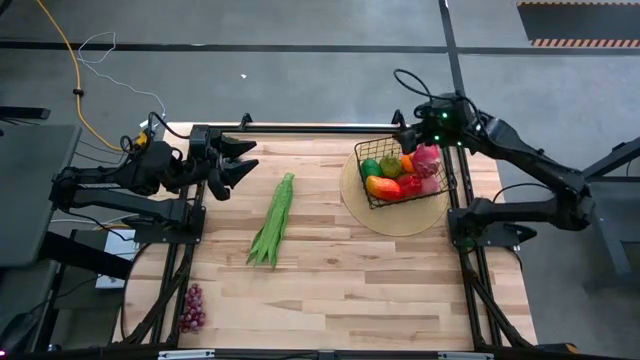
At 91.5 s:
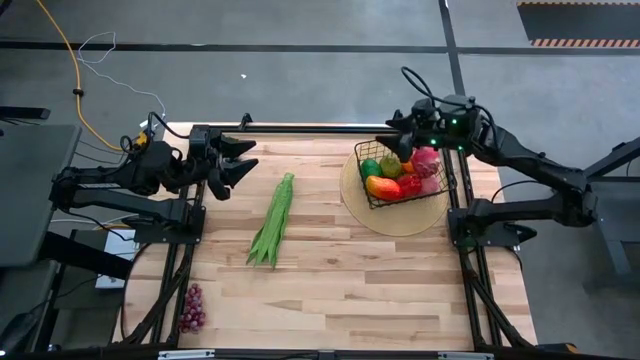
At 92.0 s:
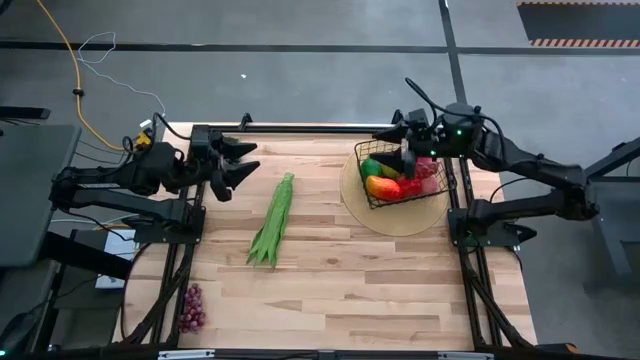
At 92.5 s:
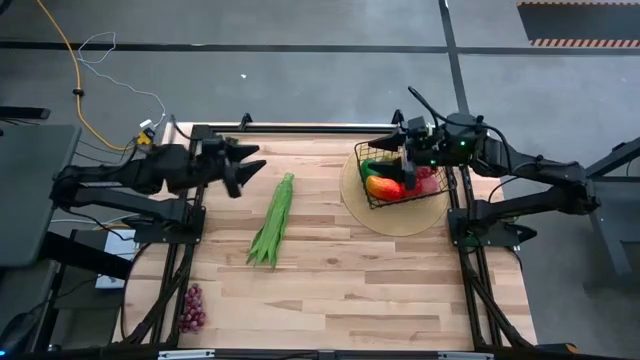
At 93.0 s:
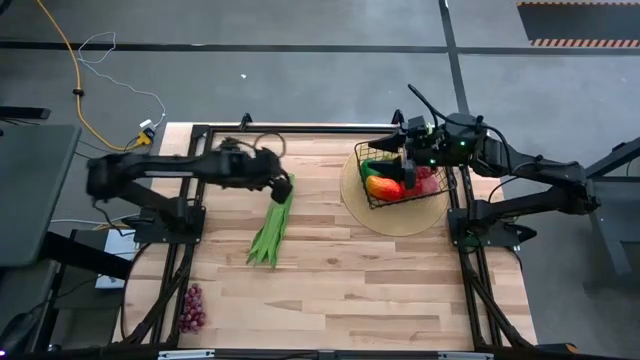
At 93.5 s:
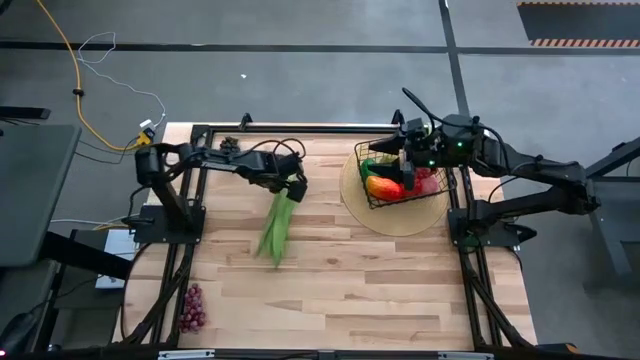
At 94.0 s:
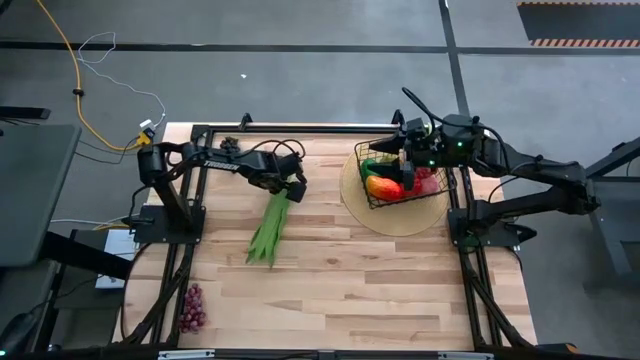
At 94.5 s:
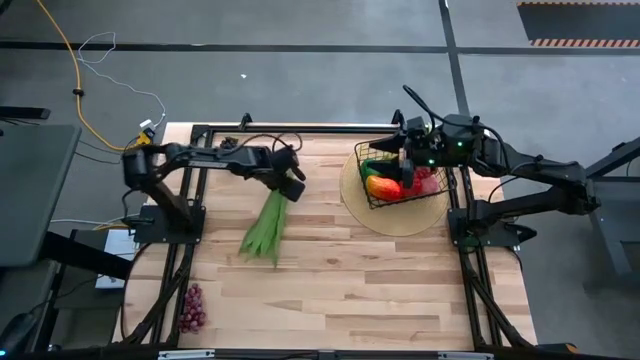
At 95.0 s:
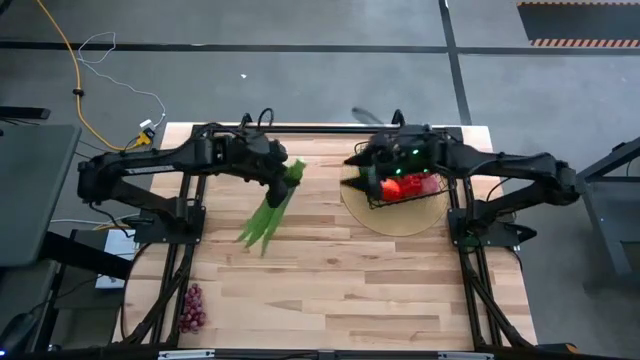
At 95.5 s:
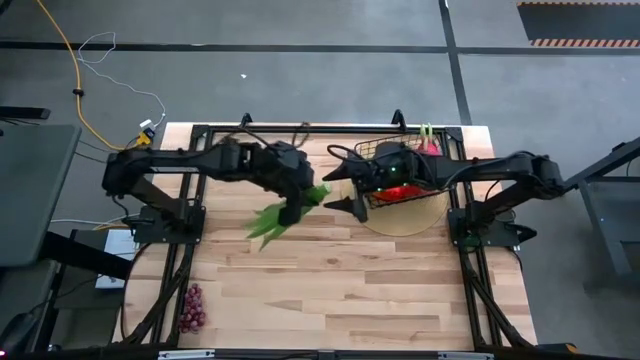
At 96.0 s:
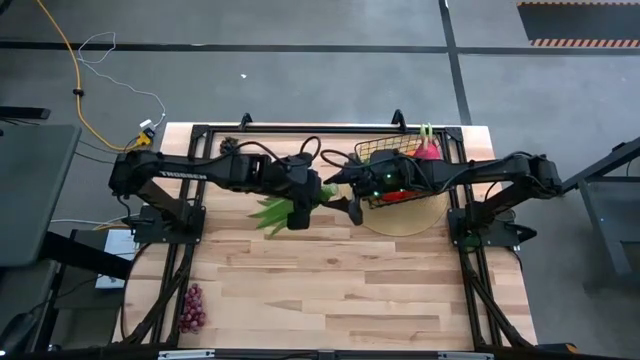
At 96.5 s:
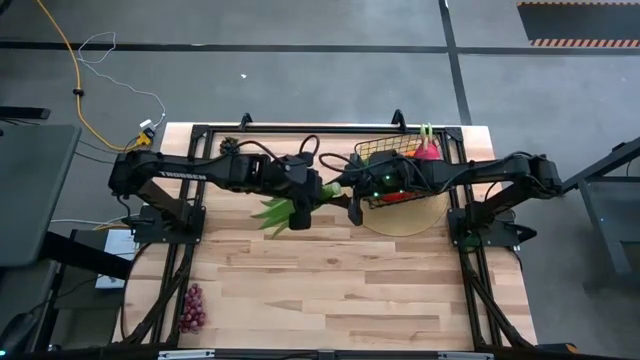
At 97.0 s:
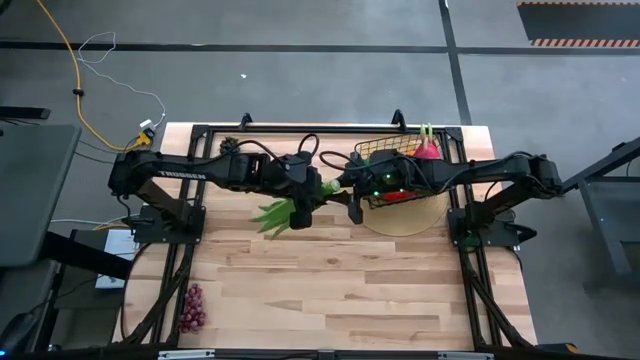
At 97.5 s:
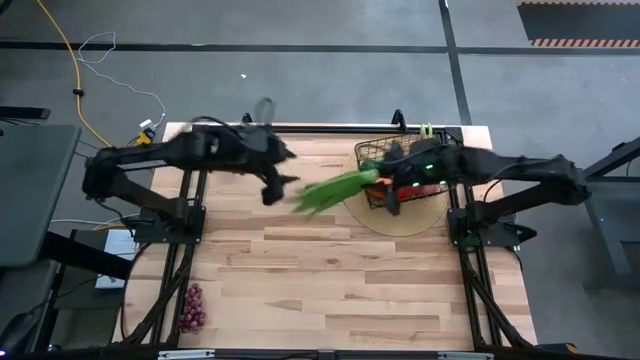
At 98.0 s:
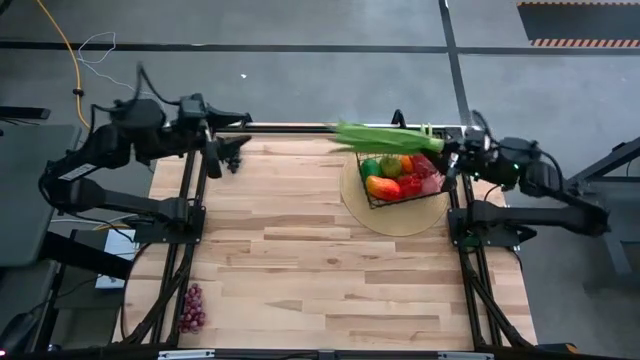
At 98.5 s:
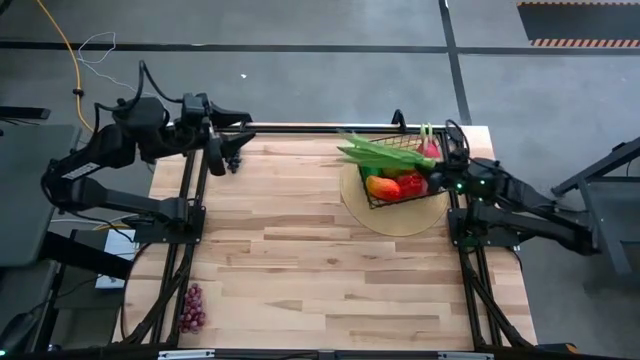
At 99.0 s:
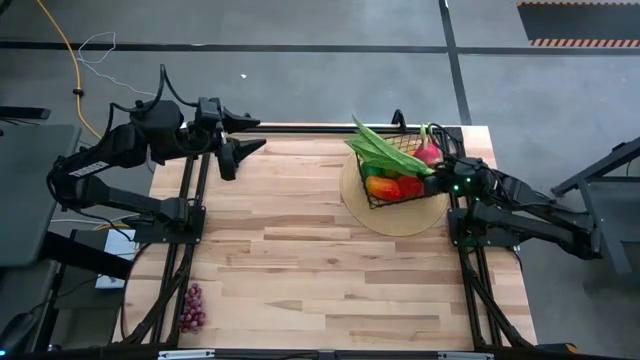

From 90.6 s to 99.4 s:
Task: Build produce basket
Put the green leaf lettuce into the black wire basket

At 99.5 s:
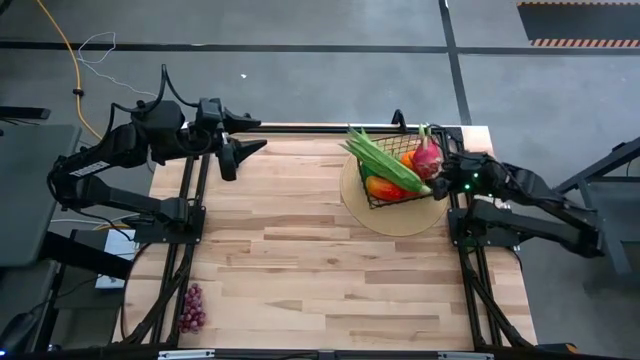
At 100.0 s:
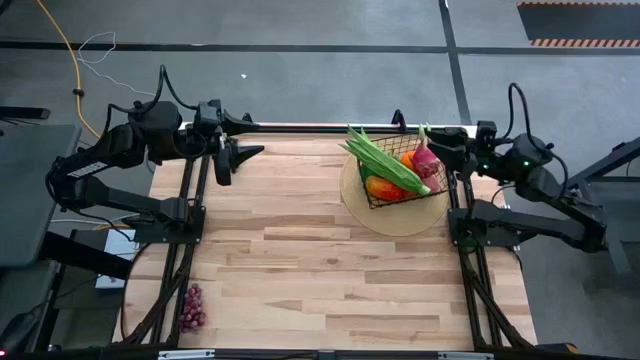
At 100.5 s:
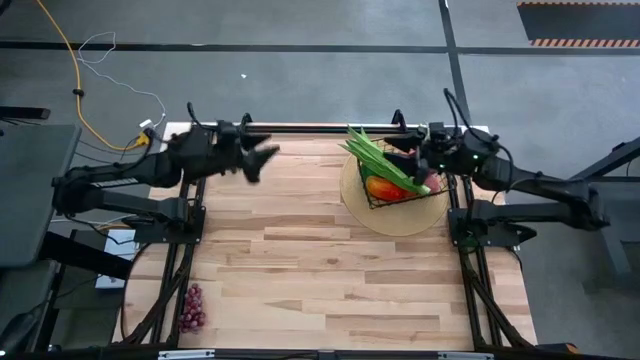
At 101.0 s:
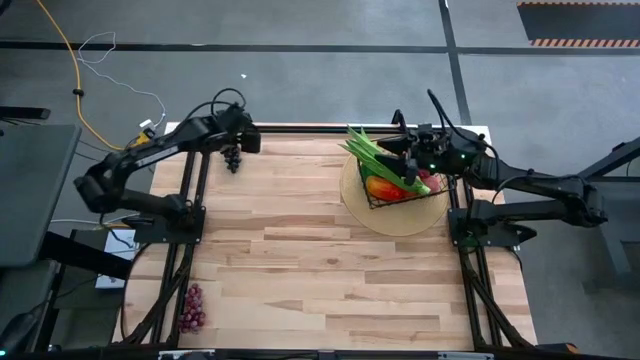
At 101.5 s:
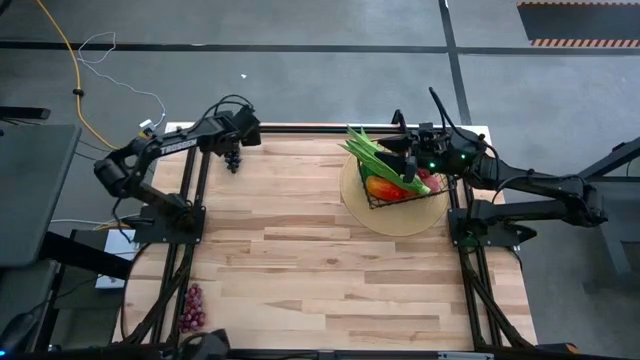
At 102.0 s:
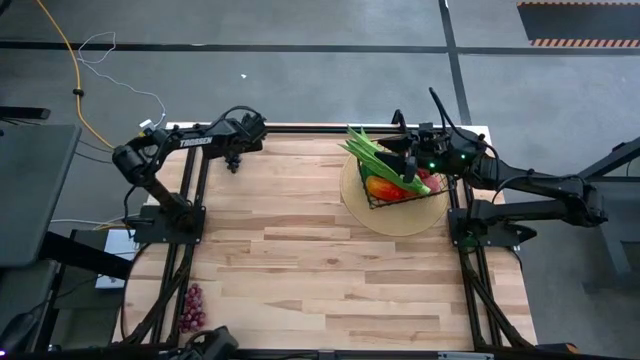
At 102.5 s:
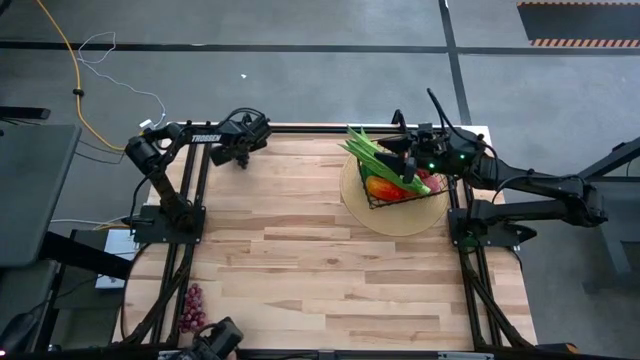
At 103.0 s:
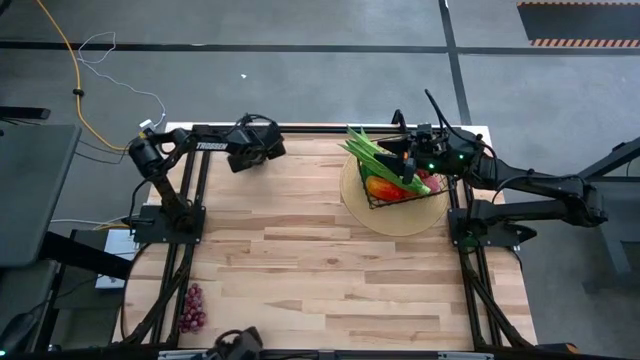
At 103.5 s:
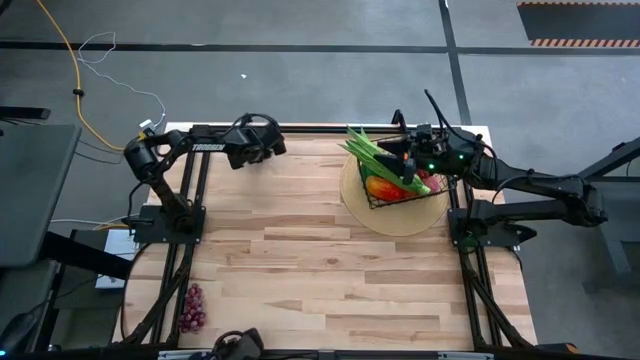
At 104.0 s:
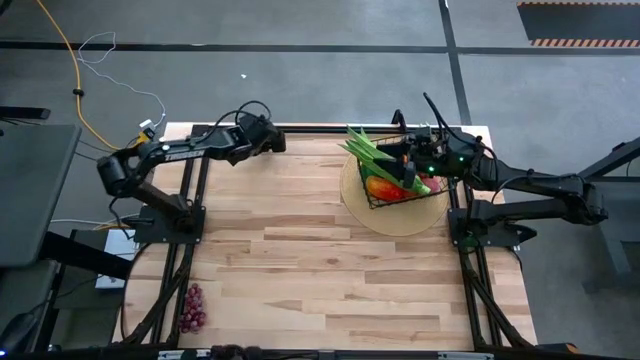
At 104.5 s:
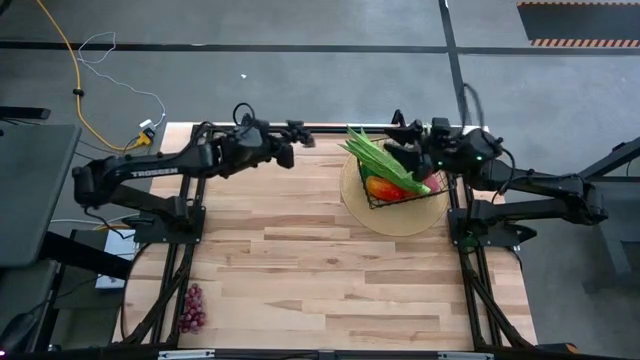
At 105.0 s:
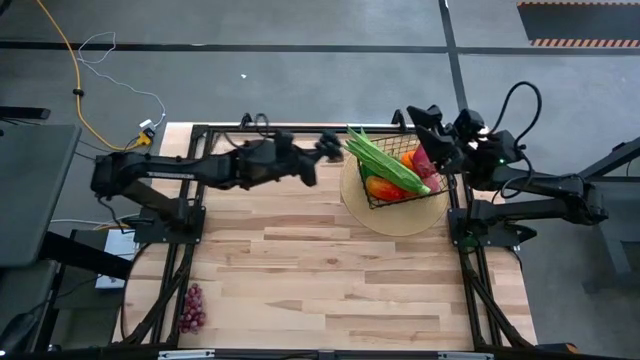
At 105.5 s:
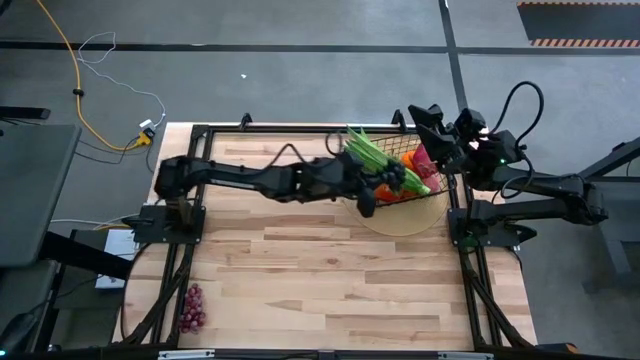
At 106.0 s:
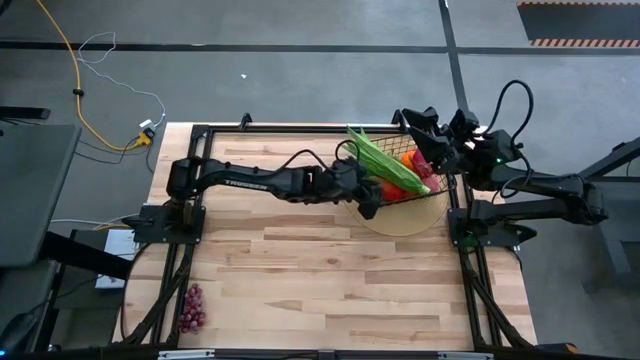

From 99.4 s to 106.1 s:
Put the purple grapes into the black wire basket

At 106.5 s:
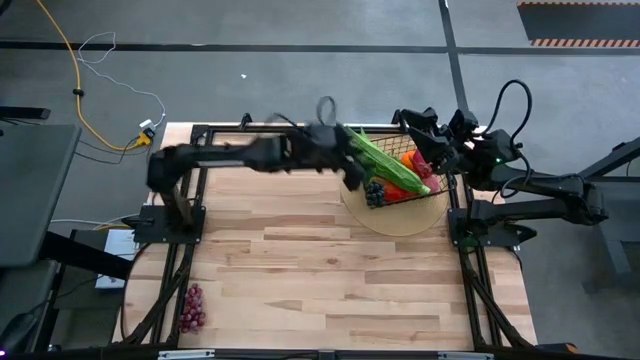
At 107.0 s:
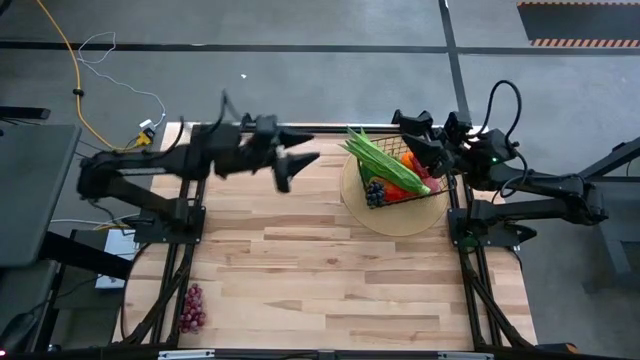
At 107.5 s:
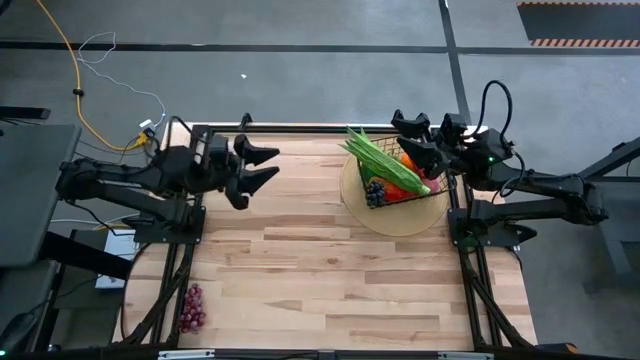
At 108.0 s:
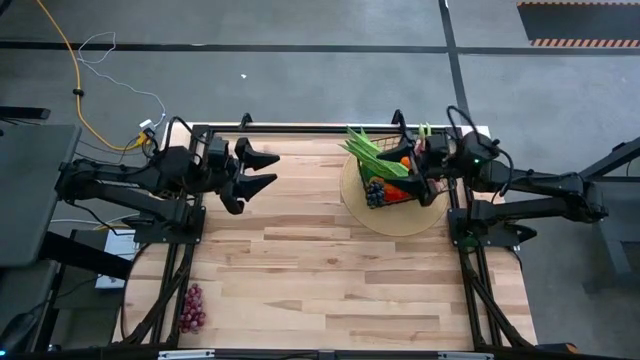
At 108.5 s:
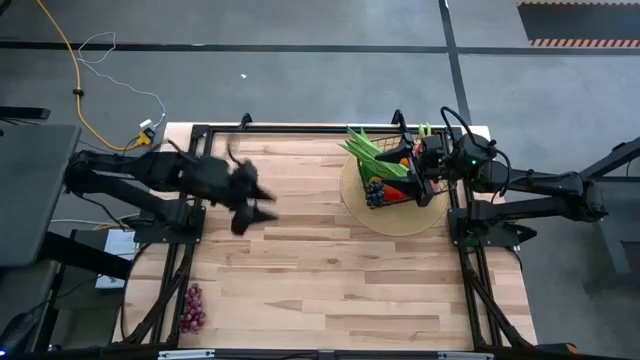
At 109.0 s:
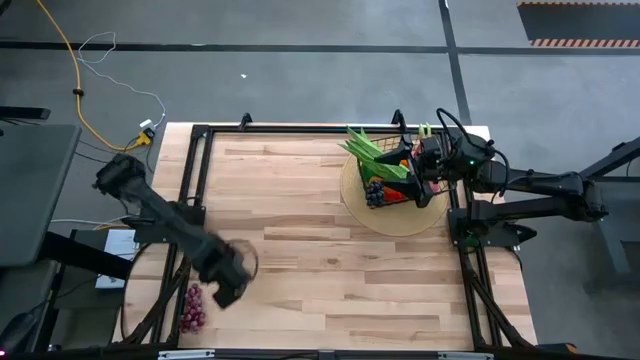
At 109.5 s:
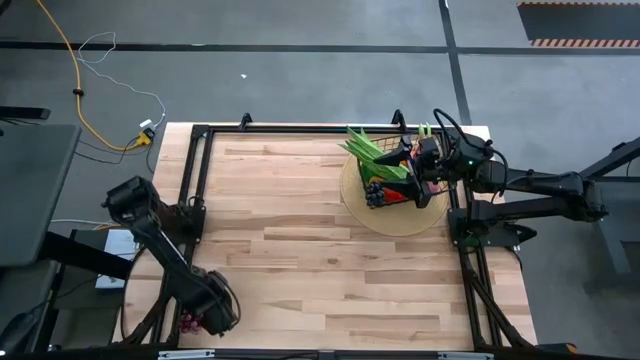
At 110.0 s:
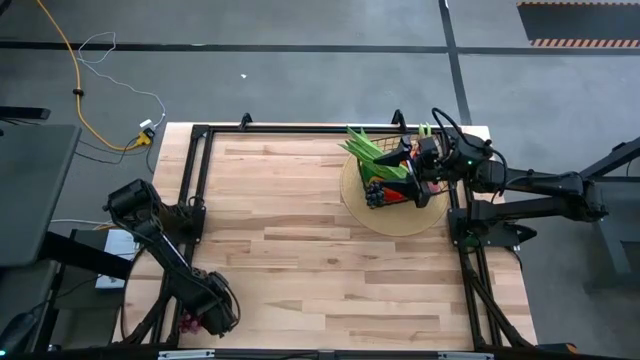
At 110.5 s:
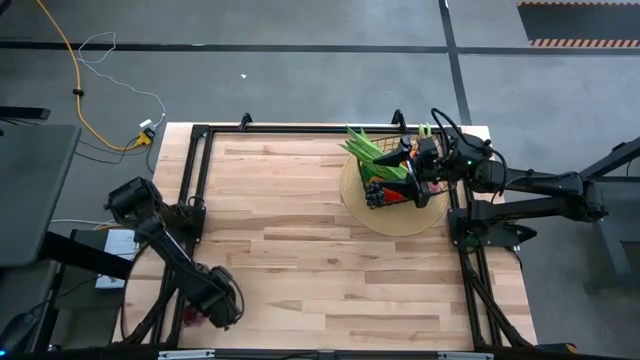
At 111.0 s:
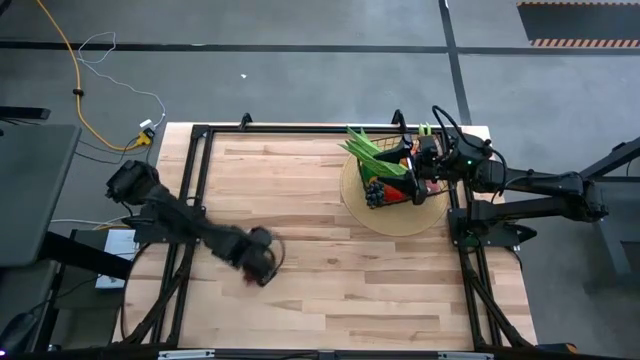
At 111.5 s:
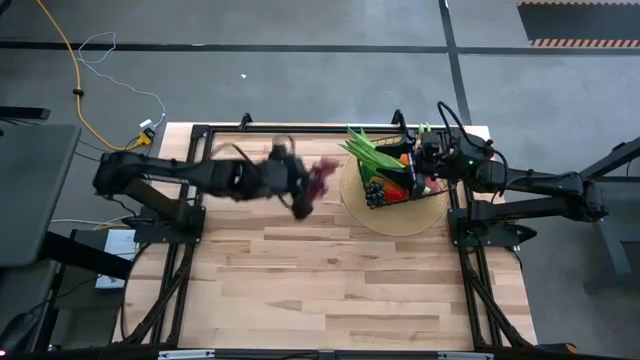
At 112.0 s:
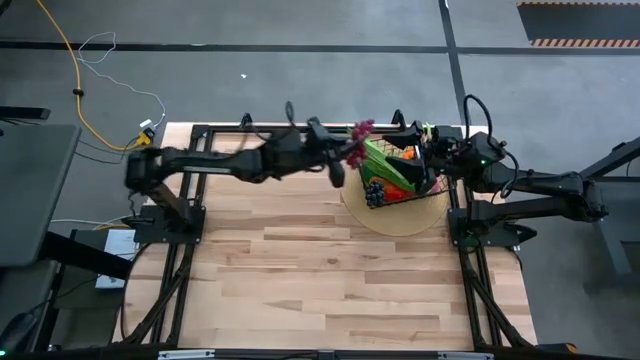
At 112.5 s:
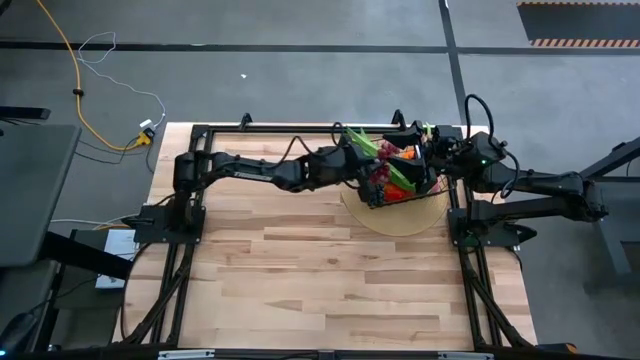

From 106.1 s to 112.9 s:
Put the red grapes into the black wire basket
